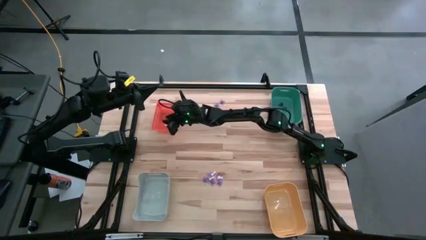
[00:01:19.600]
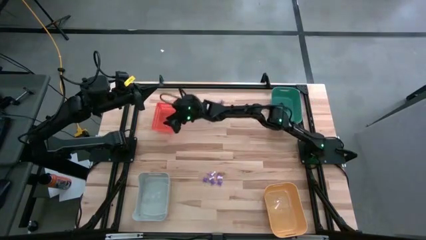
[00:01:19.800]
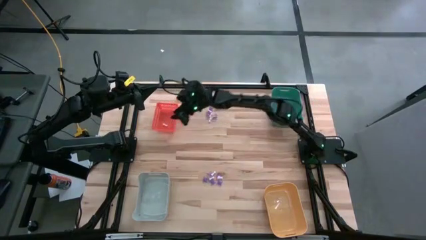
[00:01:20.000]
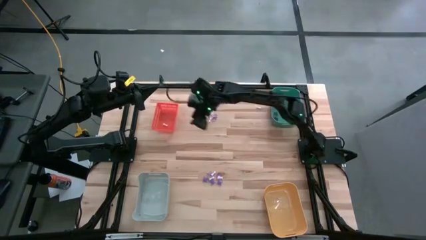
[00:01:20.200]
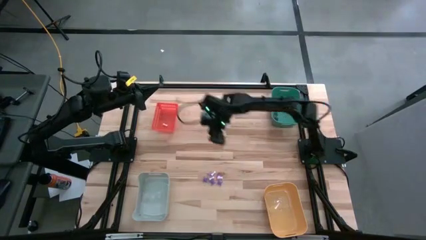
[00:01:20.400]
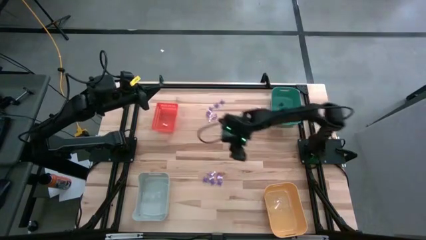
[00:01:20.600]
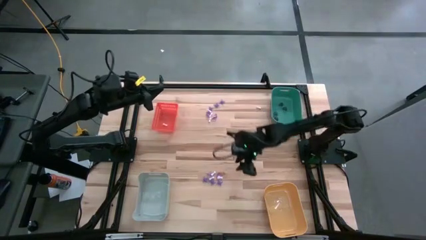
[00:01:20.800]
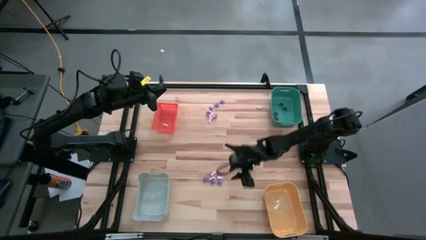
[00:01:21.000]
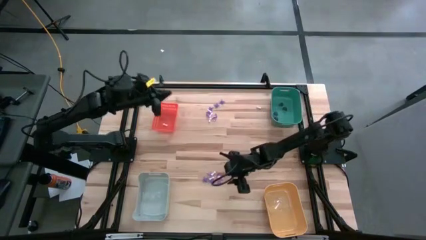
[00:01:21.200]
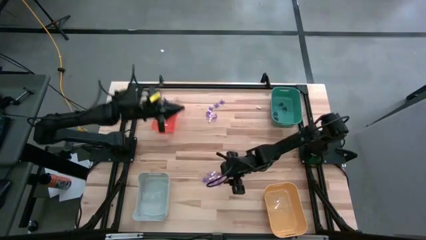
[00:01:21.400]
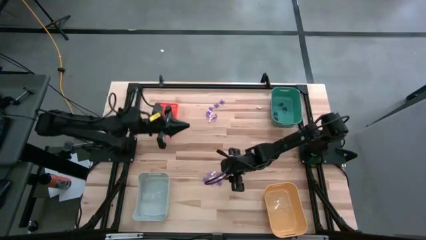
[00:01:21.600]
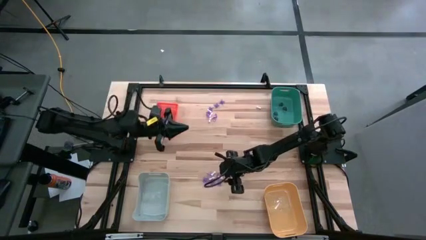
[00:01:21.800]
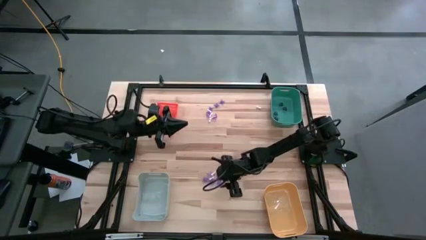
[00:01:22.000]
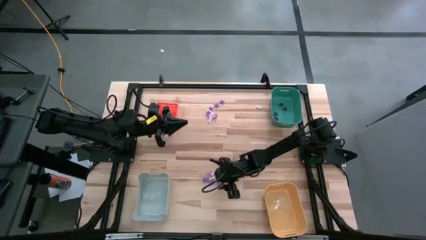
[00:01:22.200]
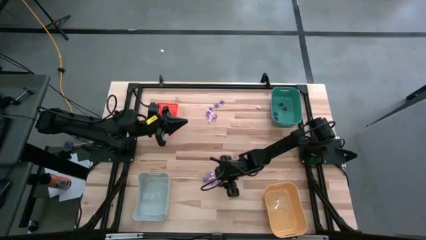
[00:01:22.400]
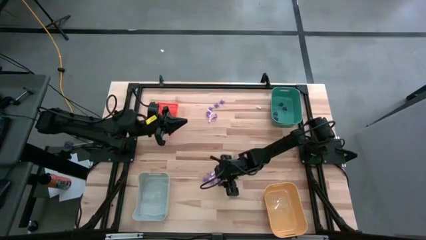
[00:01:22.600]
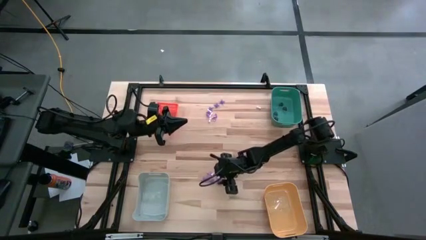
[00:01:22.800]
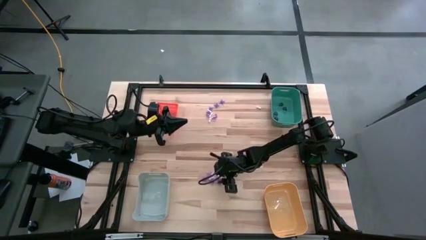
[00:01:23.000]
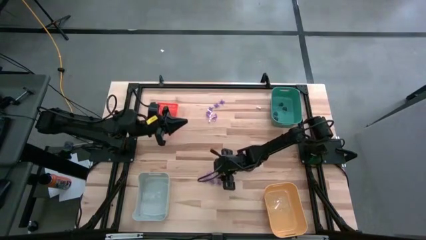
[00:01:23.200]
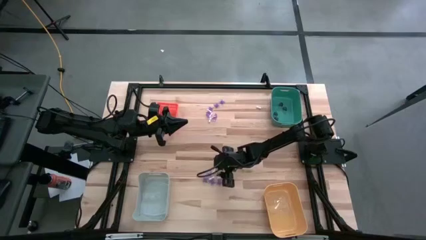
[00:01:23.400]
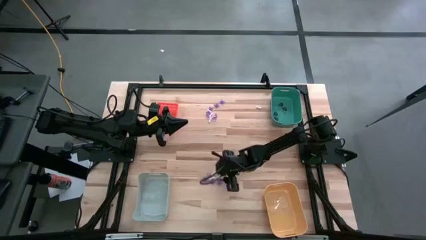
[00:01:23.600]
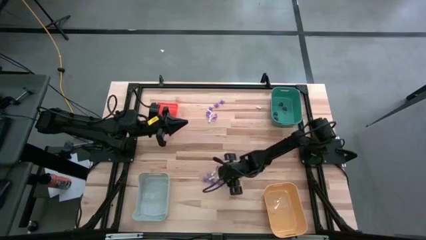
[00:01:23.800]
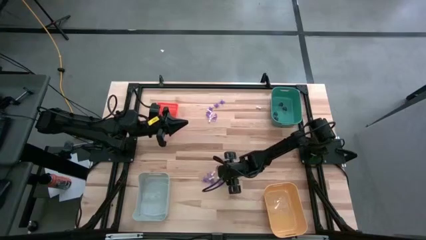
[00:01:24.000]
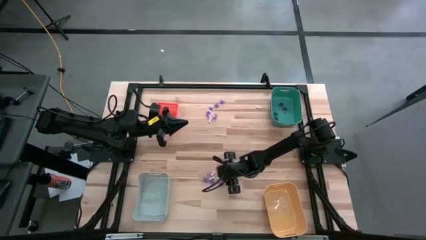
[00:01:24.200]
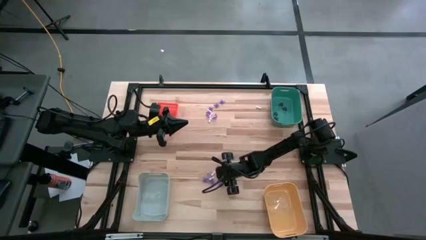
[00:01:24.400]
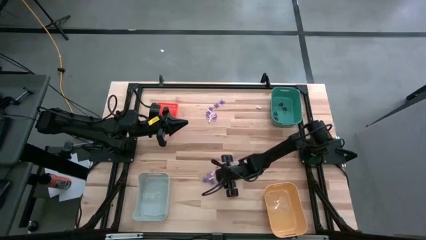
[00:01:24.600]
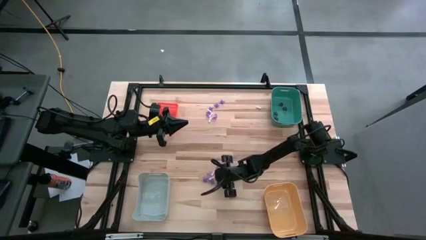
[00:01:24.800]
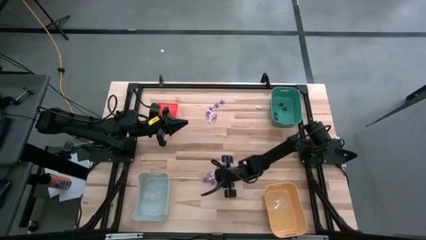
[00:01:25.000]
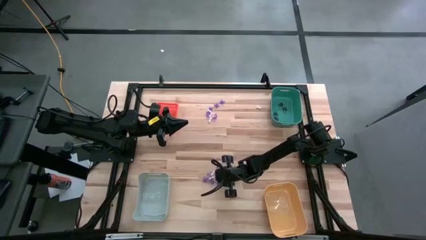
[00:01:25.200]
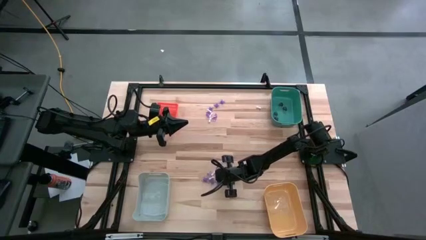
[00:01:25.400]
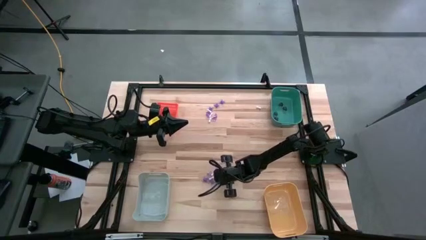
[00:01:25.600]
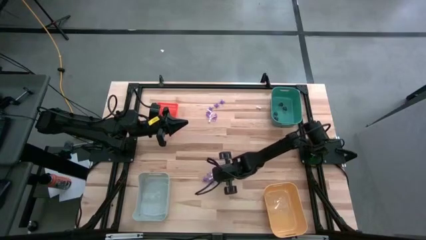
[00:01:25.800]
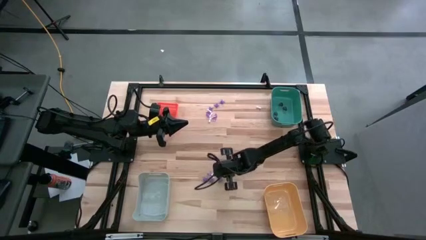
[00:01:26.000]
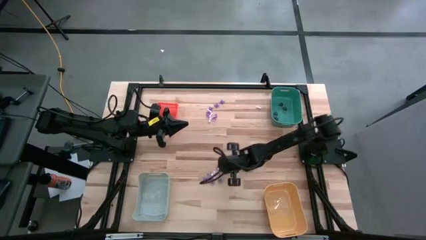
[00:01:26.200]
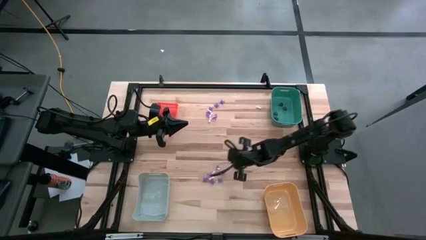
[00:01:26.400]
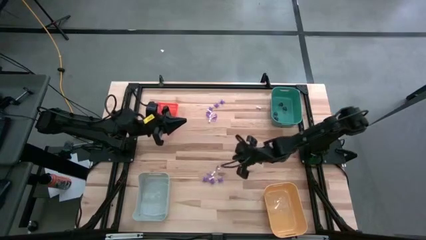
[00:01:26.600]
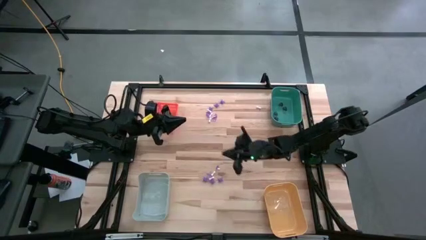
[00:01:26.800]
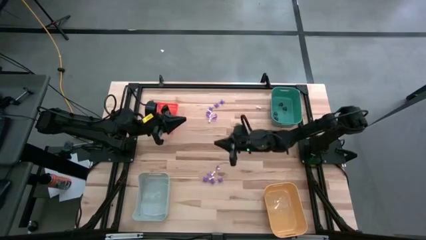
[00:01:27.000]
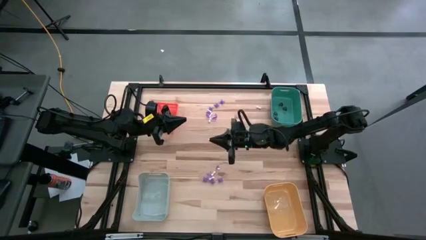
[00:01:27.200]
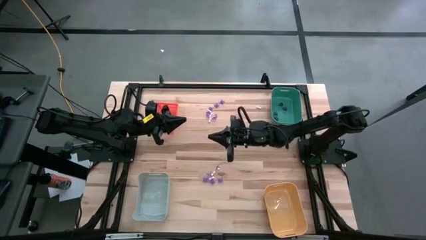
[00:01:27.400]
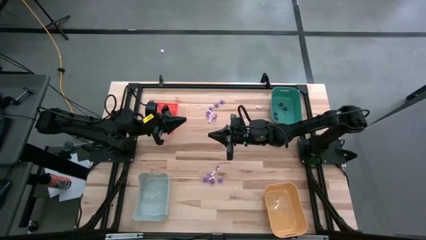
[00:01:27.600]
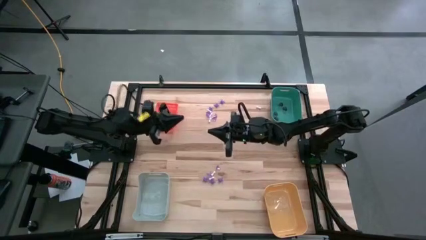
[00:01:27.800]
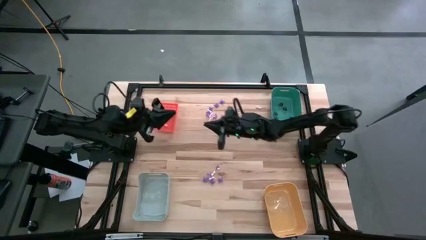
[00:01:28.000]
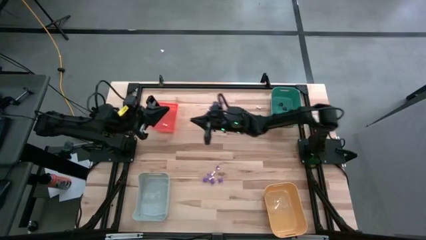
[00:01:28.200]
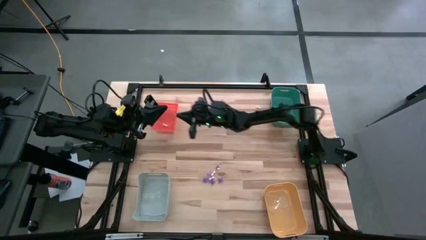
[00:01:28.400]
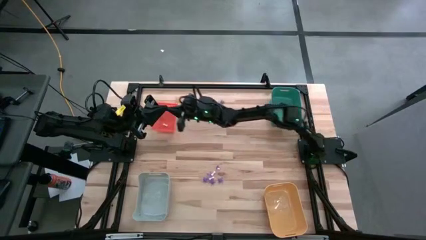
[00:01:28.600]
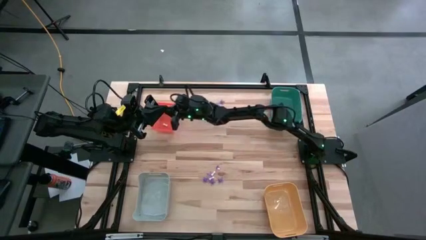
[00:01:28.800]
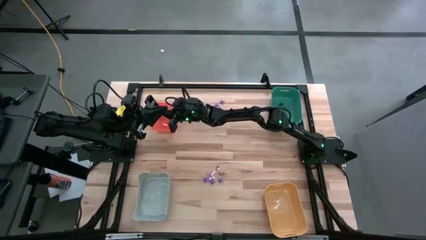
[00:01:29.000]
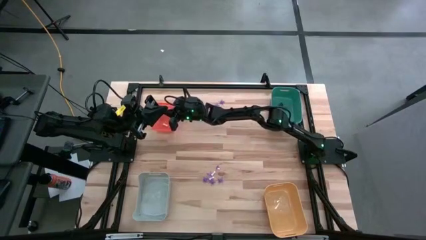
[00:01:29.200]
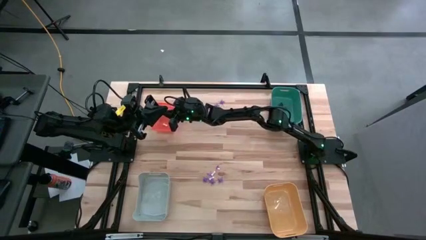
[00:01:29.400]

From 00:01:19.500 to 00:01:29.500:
Task: Sort Halloween decoration
Put the white bone toy into the orange bin

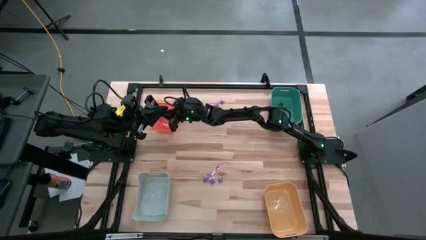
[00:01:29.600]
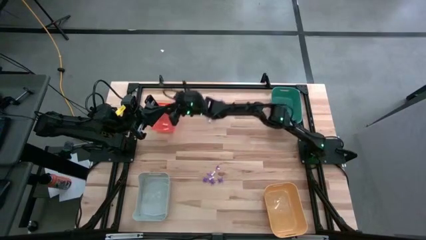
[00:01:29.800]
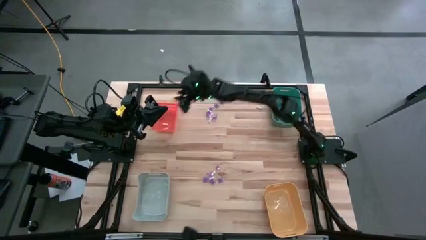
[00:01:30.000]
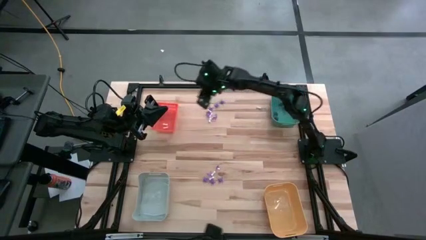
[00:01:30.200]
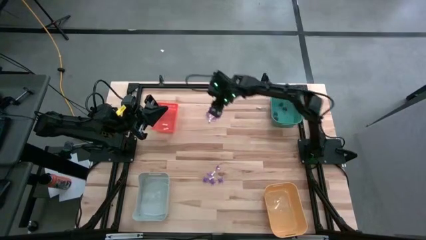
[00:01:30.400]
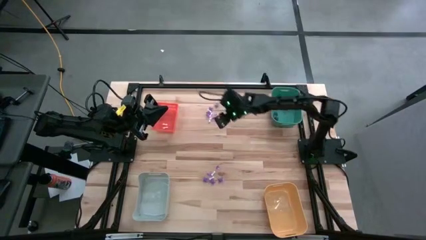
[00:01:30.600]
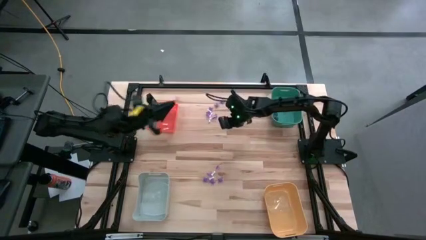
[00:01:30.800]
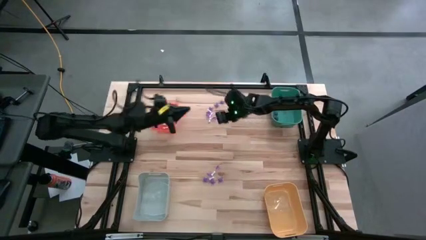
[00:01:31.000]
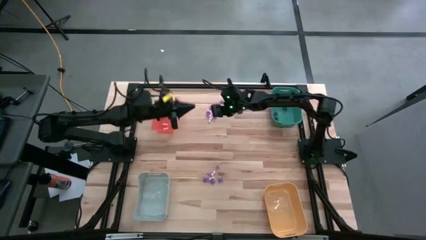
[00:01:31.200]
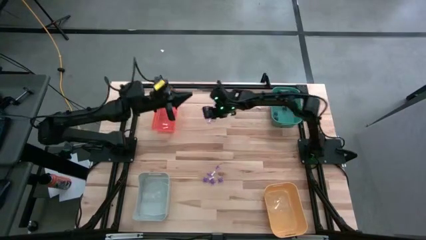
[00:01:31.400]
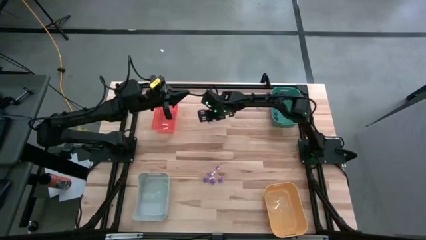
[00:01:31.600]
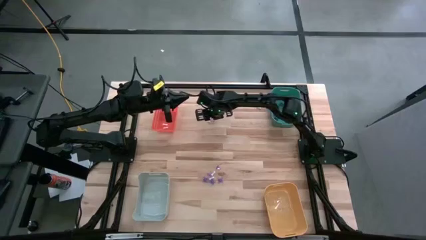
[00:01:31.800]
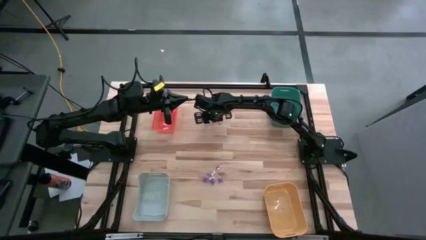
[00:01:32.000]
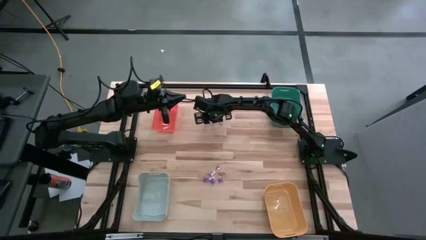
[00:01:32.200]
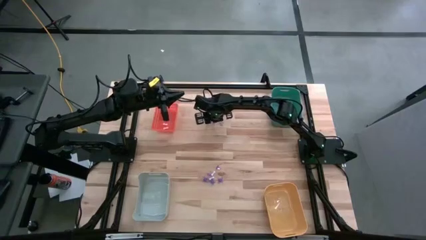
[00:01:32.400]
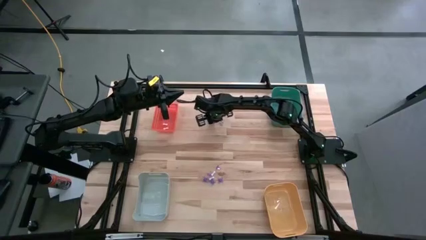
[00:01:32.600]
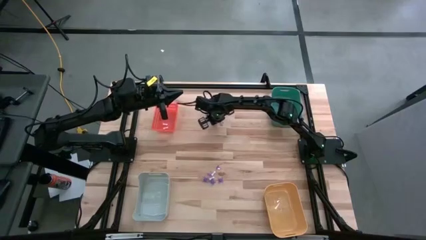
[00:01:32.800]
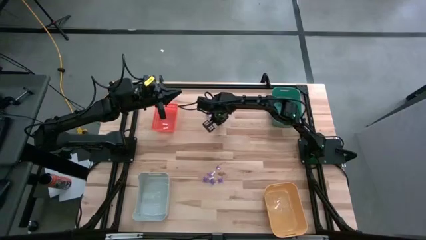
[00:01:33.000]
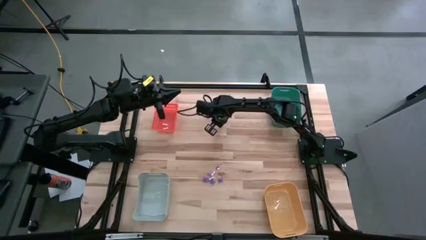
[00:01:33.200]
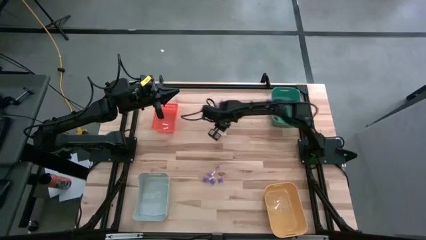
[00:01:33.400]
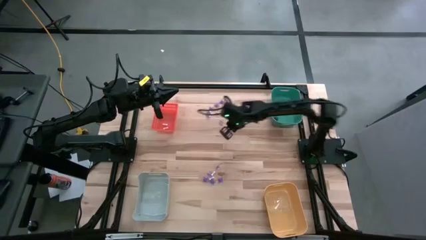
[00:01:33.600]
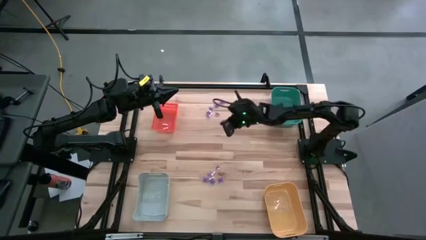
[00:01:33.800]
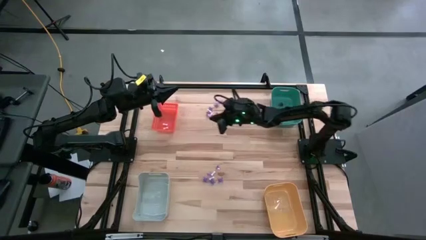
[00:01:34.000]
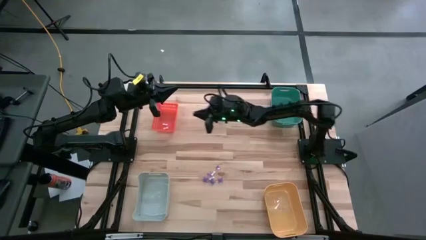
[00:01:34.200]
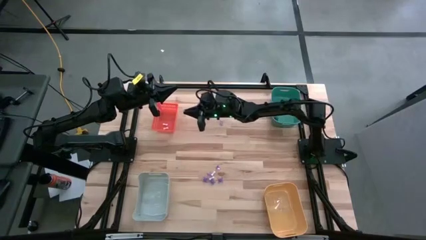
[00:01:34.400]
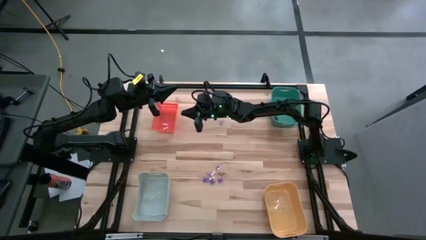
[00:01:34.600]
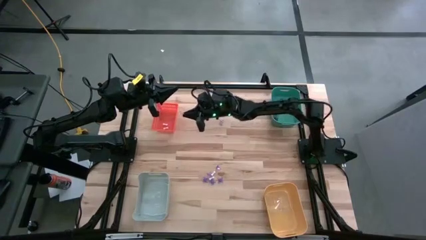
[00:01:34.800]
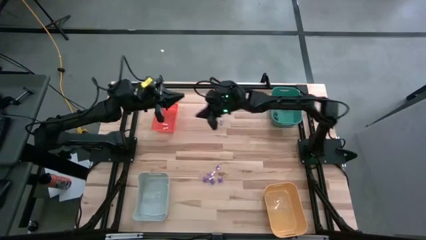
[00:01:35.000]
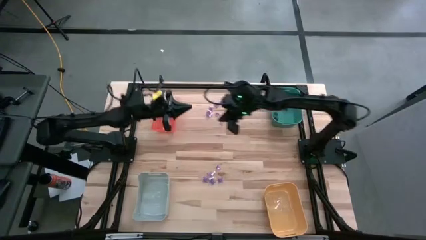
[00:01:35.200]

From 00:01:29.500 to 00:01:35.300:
Put the white bone toy into the orange bin
